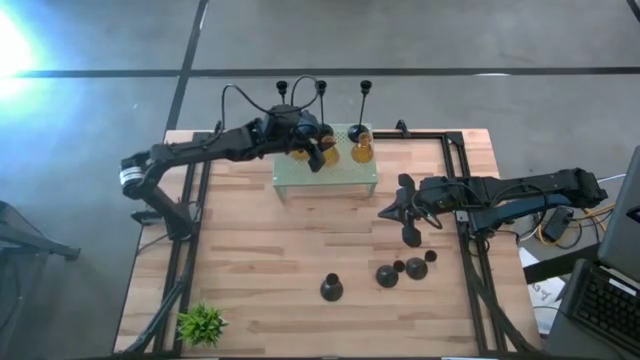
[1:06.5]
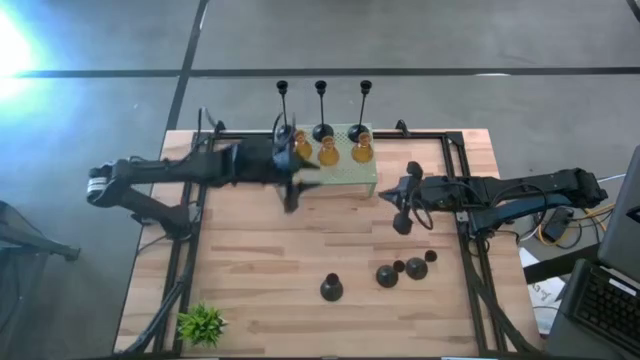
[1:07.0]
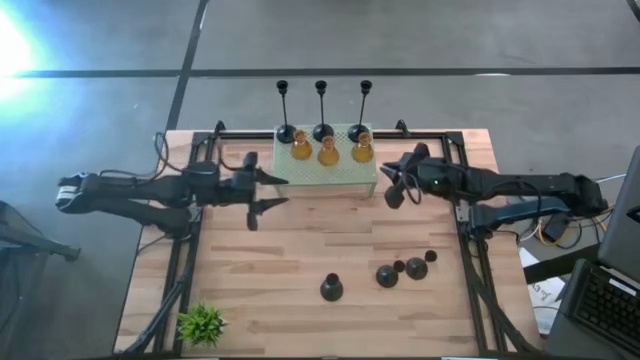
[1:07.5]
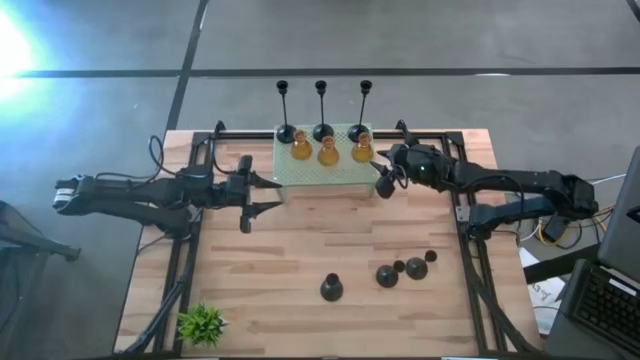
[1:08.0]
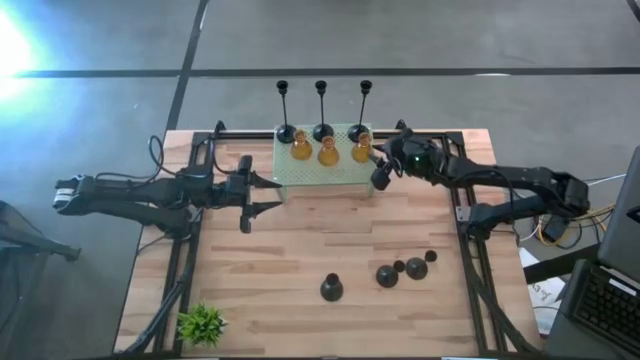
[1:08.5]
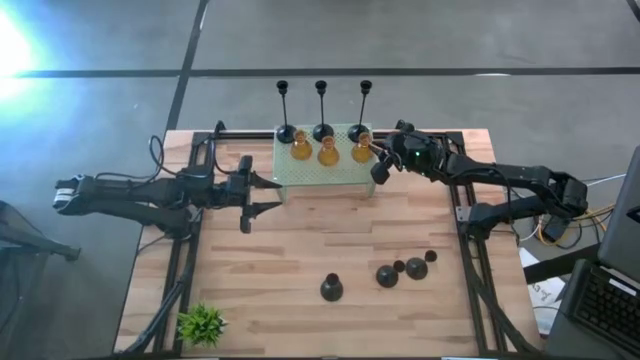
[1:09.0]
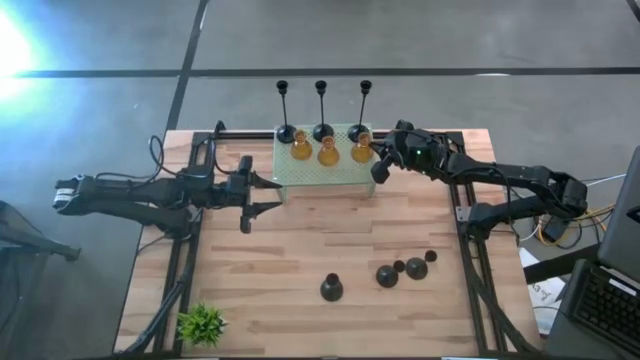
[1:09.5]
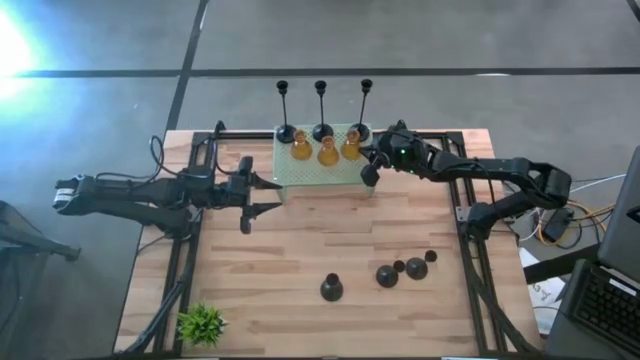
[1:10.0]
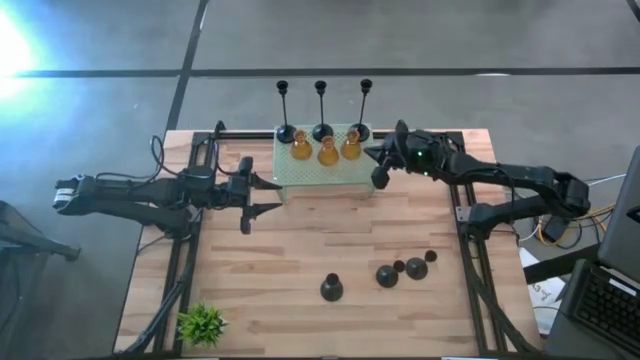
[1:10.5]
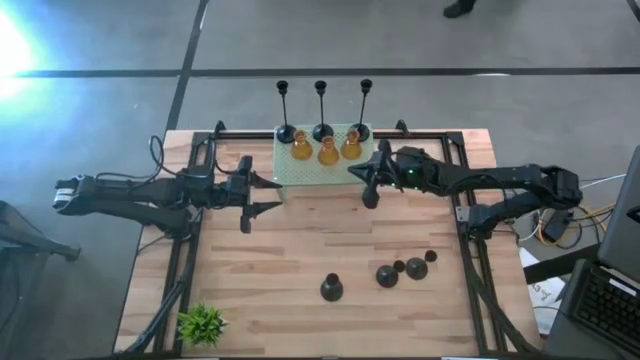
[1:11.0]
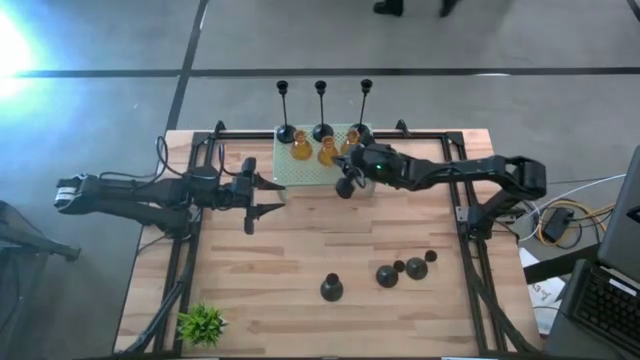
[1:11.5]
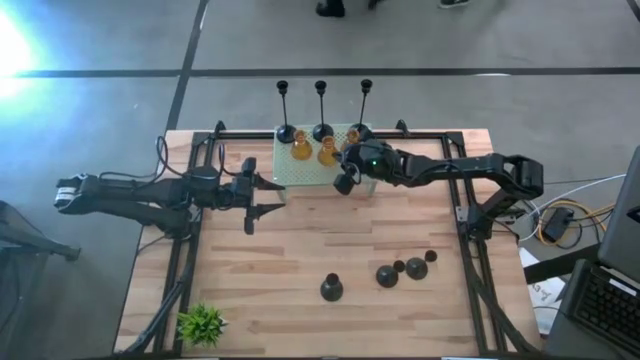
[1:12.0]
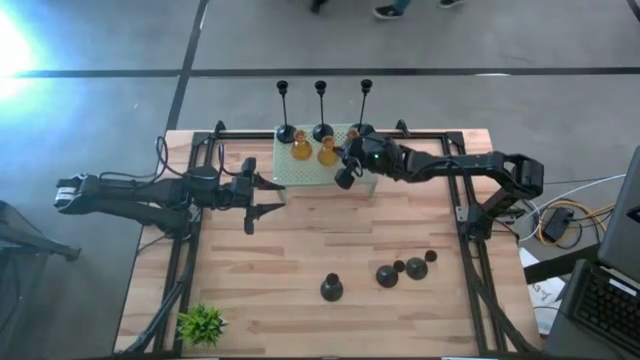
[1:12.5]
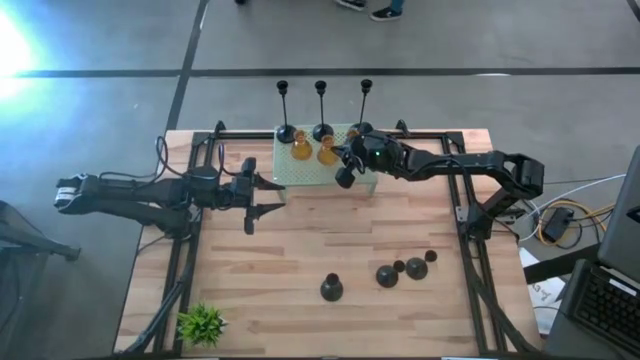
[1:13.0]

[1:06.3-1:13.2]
Task: Pick & Place candle stick holders
Adjust the yellow glass candle holders on the shelf

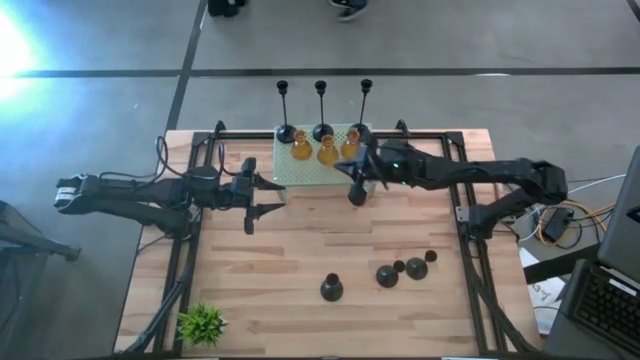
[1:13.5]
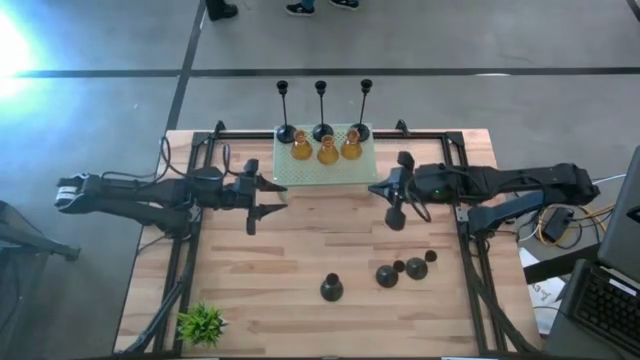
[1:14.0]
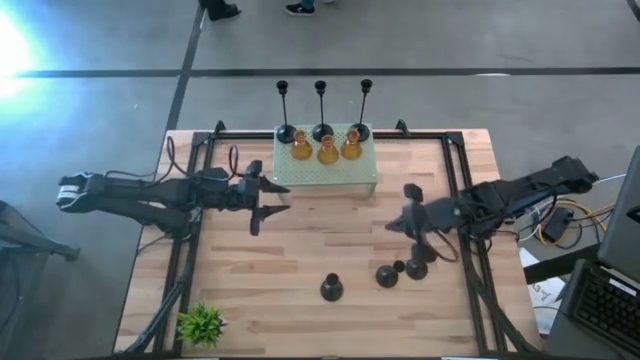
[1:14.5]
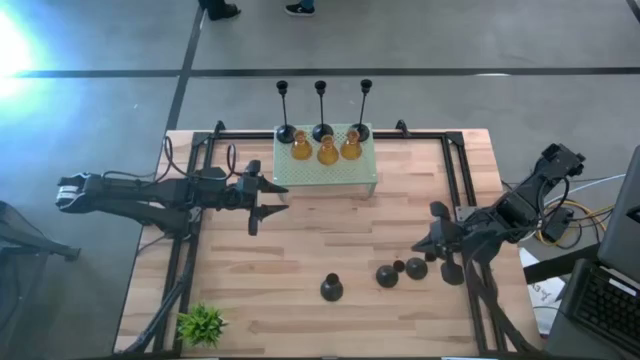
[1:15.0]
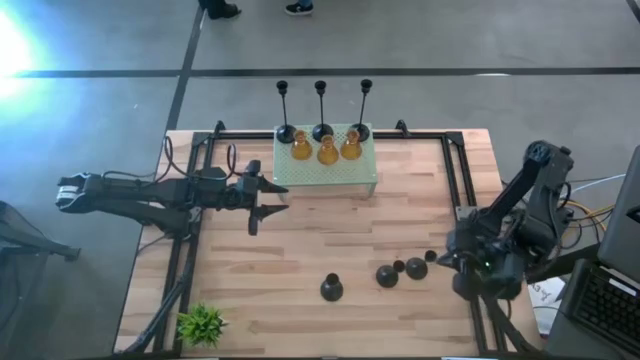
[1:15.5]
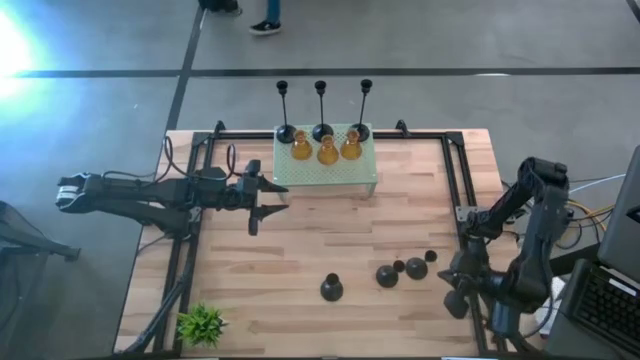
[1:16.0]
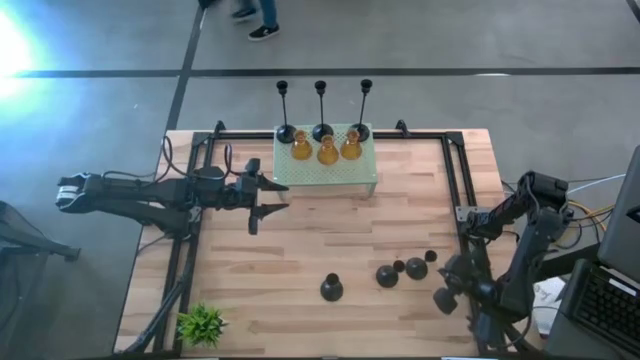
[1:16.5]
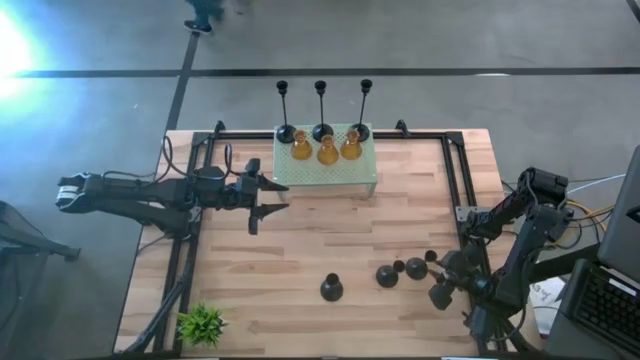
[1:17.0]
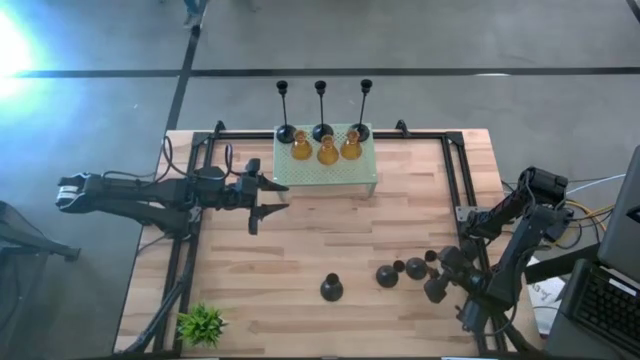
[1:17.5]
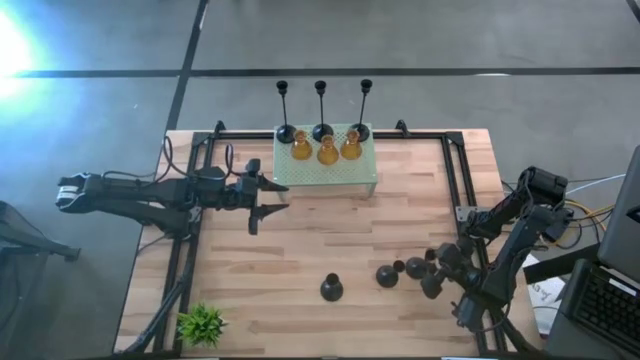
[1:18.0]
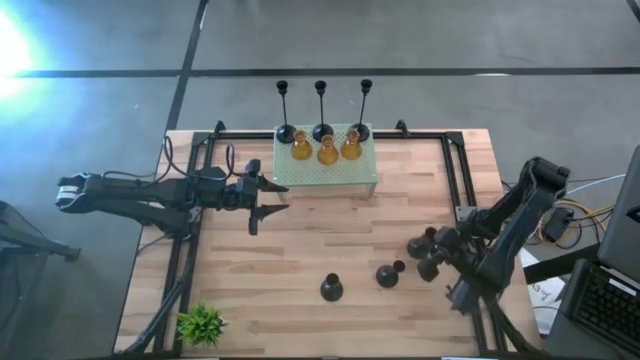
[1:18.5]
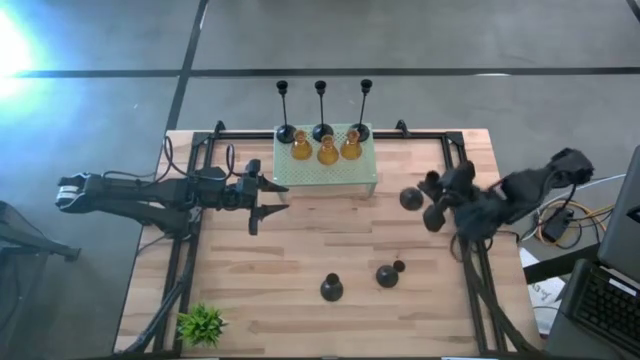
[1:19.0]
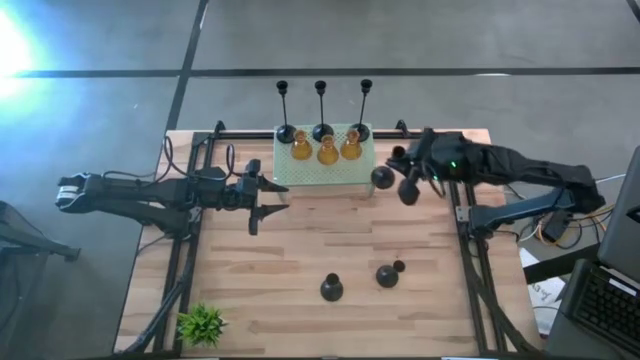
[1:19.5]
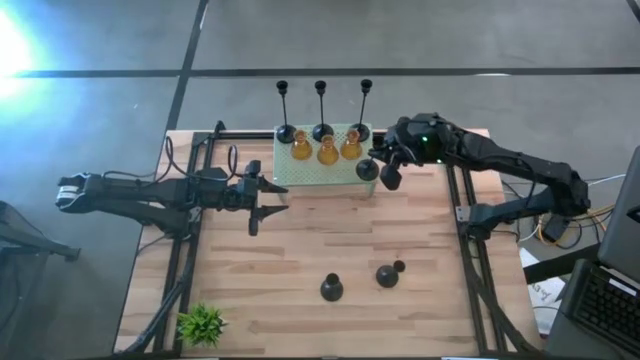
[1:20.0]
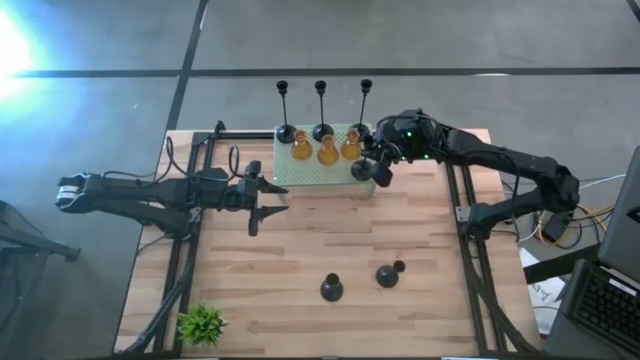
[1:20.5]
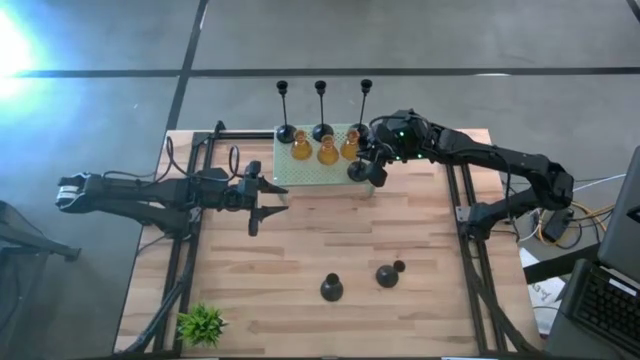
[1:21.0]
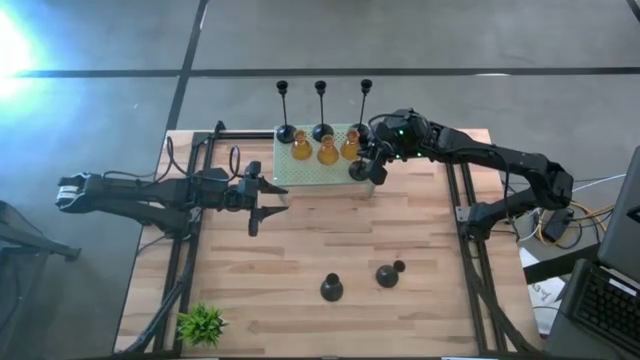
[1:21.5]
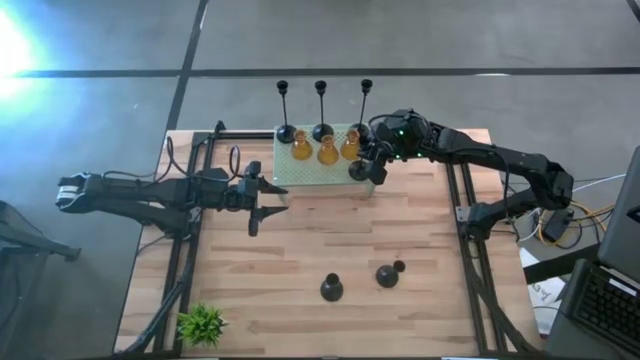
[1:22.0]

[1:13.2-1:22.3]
Put the small black candle holder on the shelf

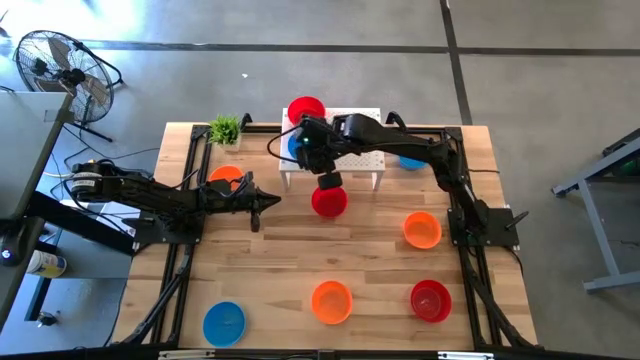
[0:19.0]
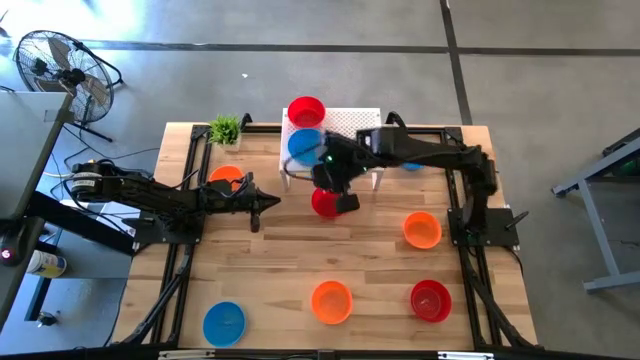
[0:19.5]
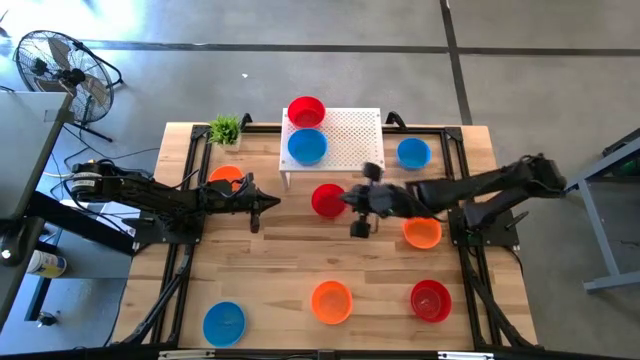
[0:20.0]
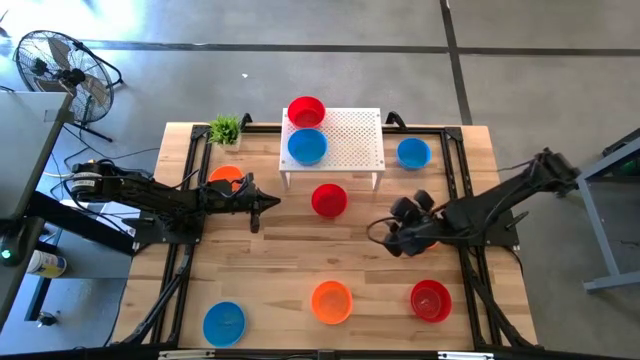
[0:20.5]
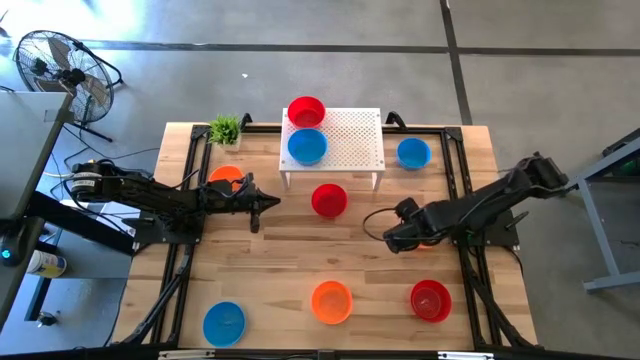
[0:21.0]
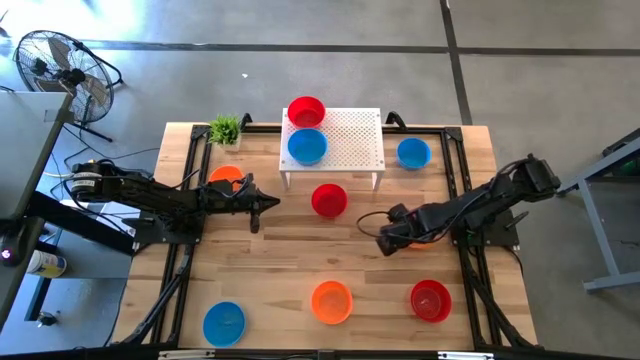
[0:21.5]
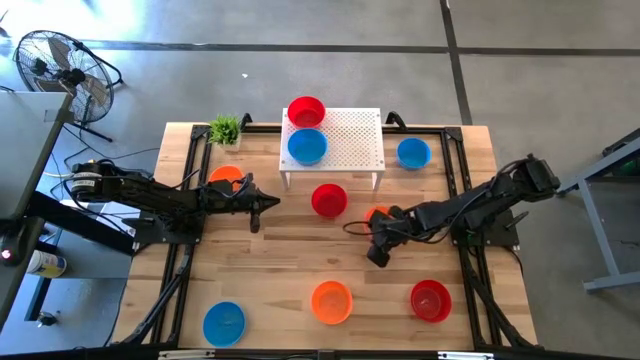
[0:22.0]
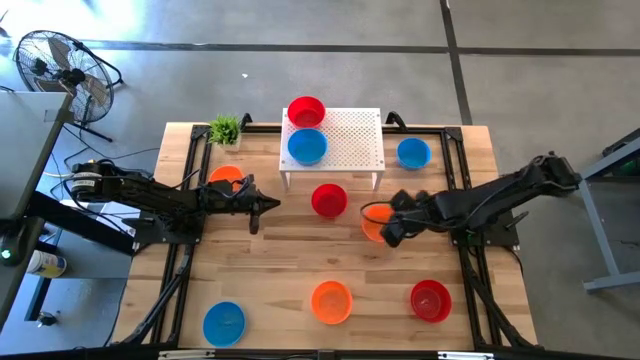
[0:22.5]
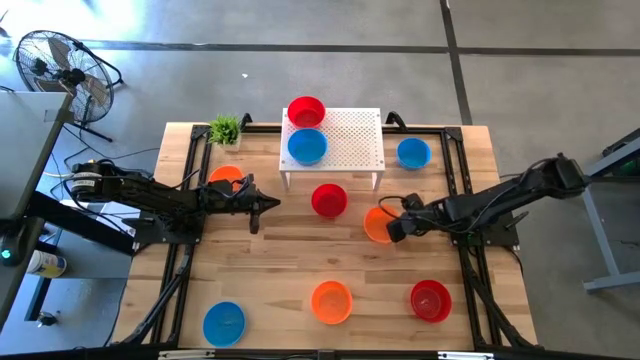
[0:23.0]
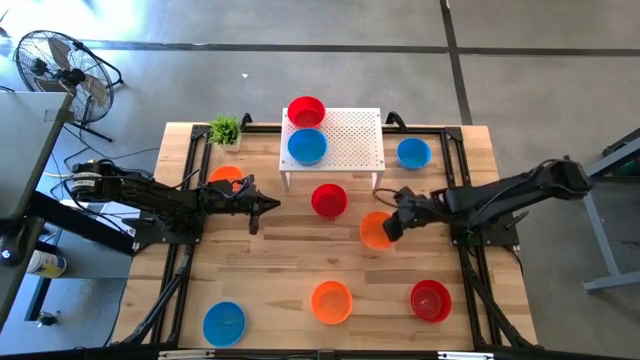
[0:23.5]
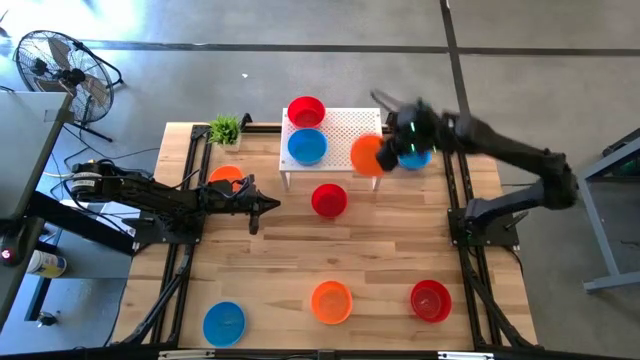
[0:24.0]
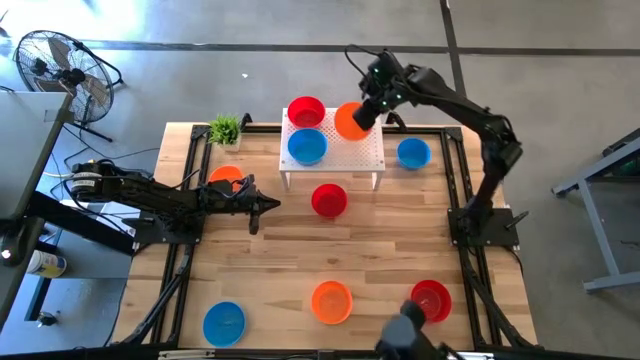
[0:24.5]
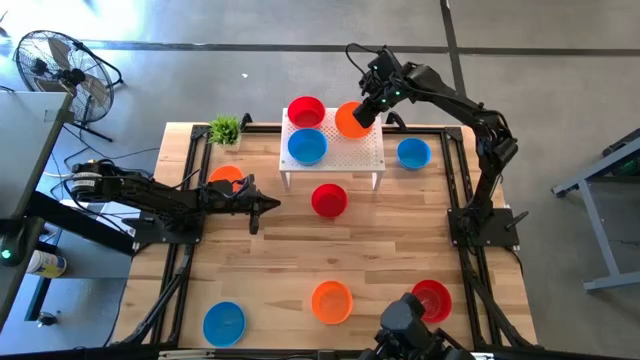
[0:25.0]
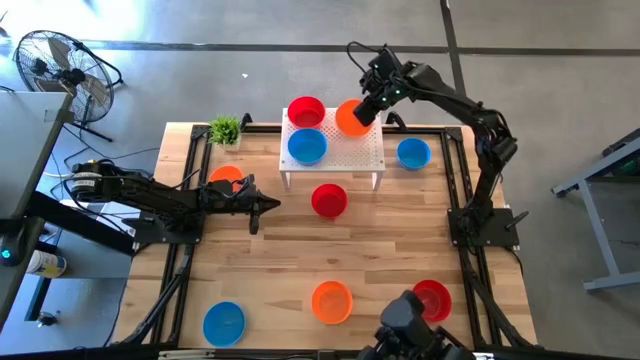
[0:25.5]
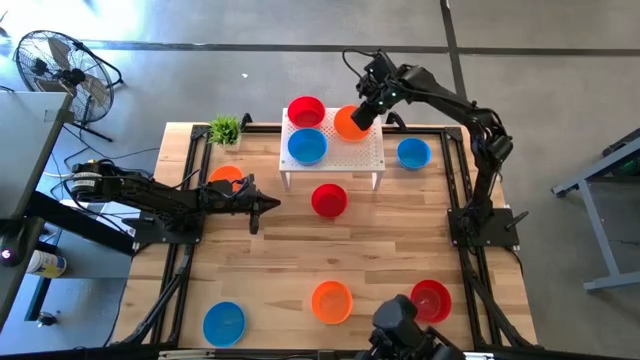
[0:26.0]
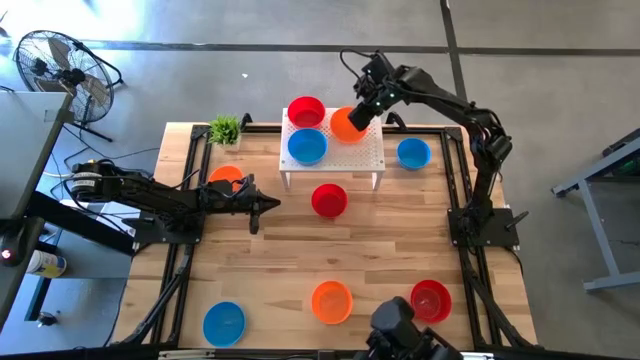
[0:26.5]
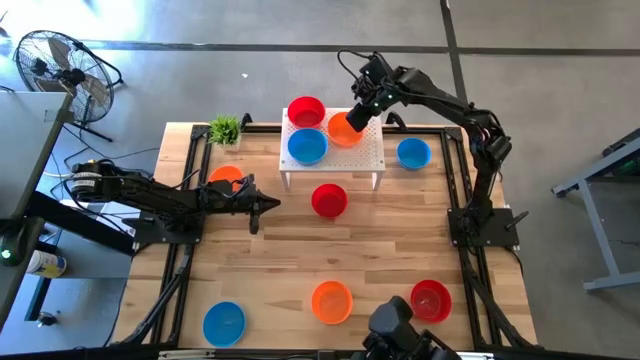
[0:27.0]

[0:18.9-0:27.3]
Task: Pick & Place Mini bowls
Put the middle orange bowl on the shelf
